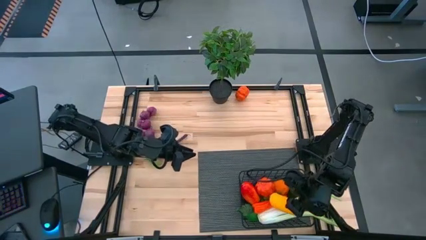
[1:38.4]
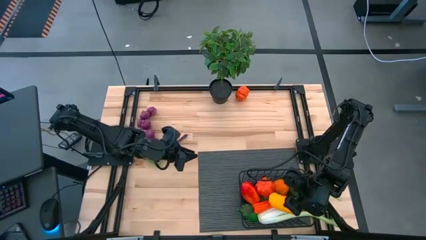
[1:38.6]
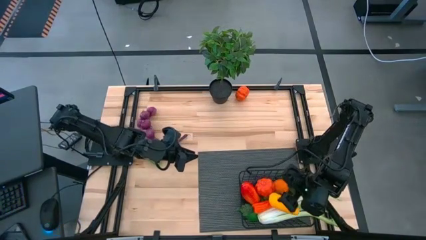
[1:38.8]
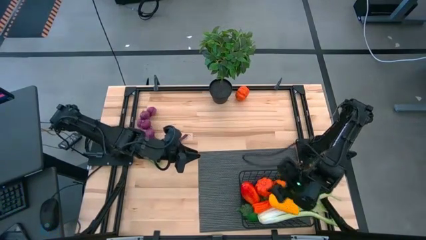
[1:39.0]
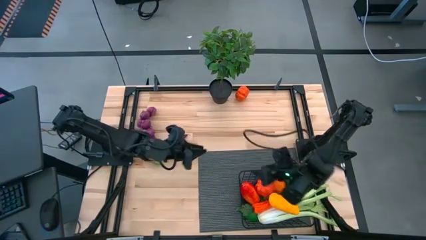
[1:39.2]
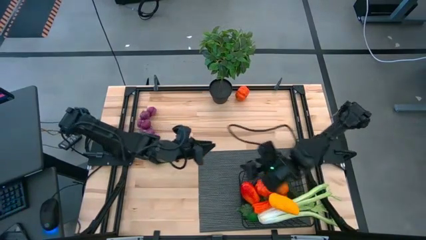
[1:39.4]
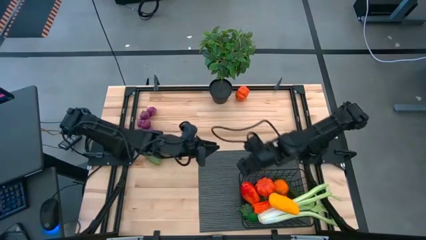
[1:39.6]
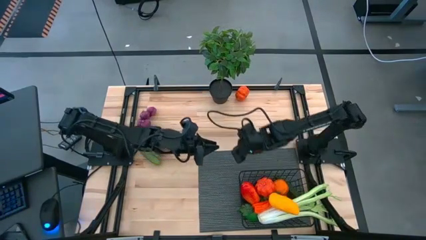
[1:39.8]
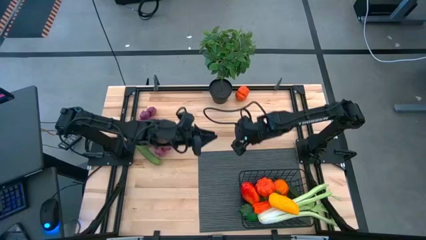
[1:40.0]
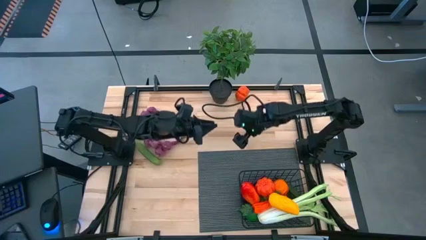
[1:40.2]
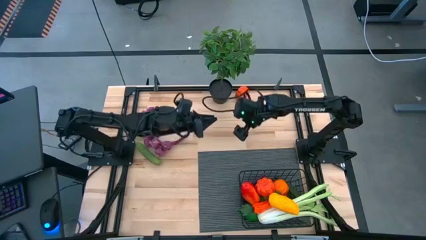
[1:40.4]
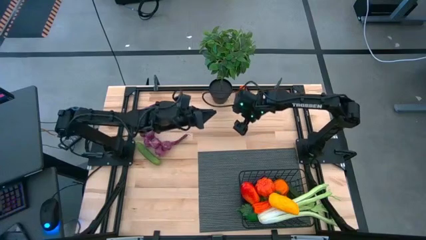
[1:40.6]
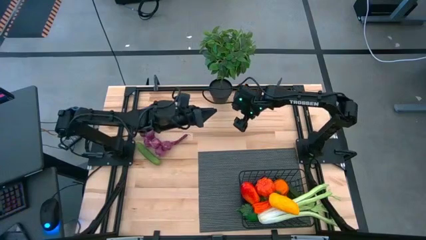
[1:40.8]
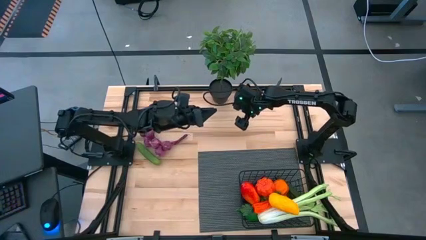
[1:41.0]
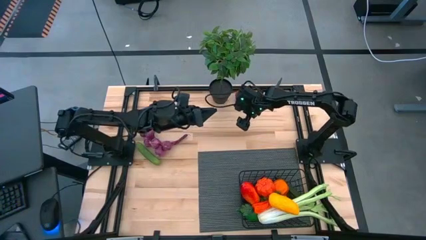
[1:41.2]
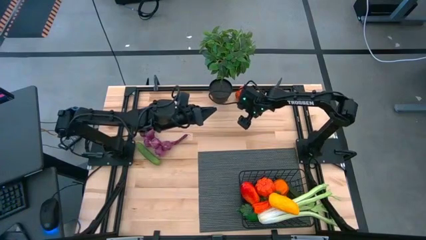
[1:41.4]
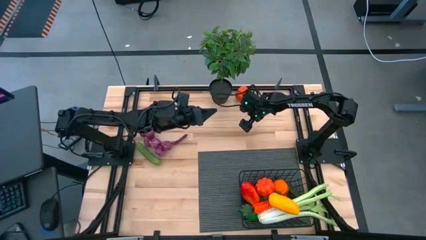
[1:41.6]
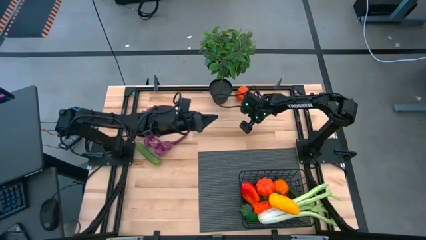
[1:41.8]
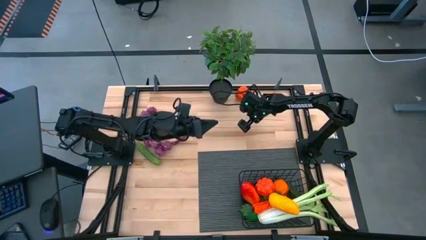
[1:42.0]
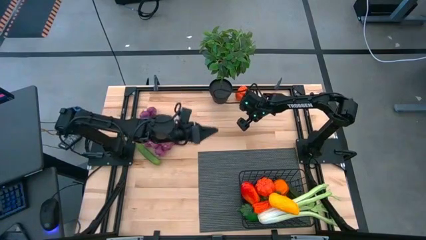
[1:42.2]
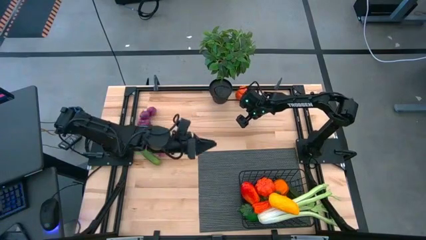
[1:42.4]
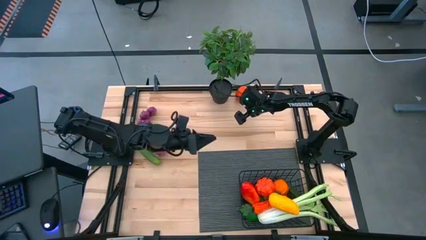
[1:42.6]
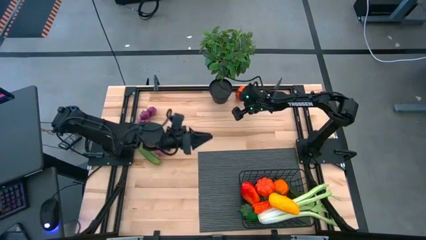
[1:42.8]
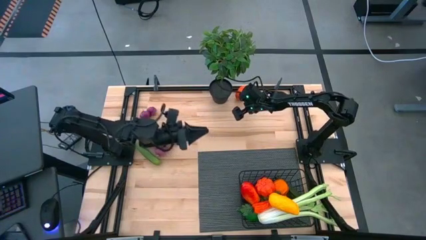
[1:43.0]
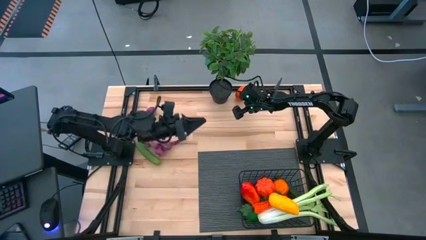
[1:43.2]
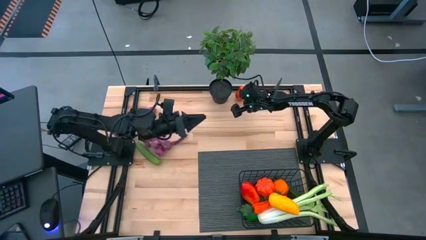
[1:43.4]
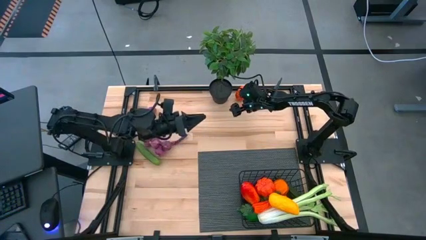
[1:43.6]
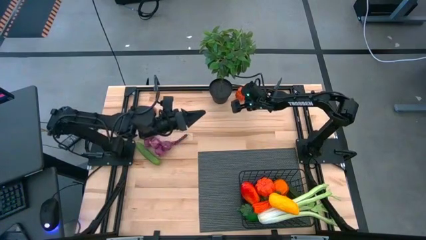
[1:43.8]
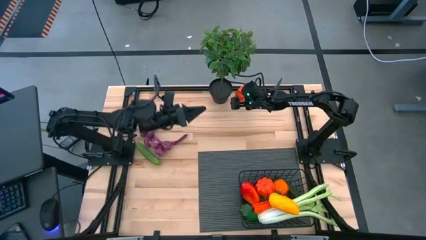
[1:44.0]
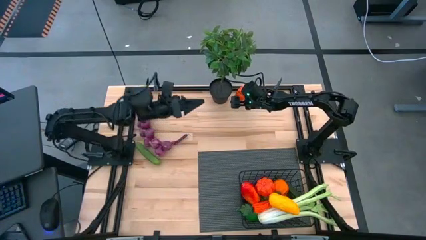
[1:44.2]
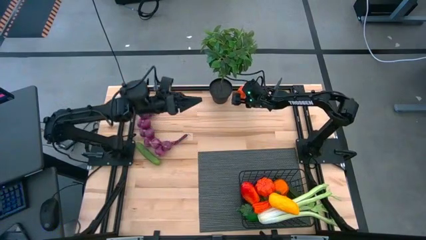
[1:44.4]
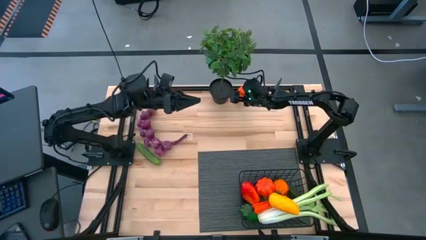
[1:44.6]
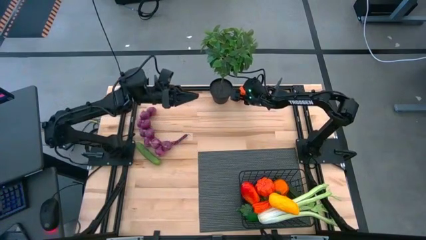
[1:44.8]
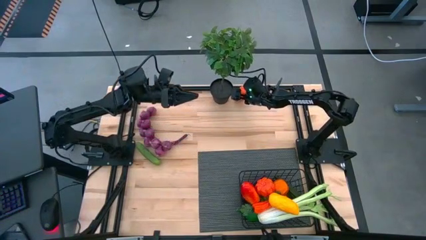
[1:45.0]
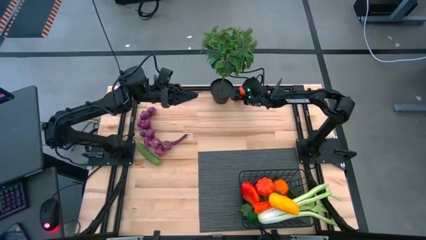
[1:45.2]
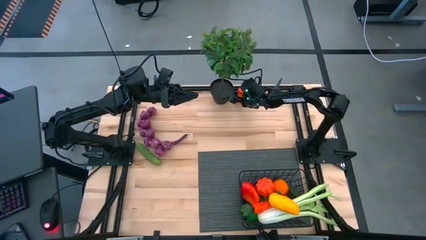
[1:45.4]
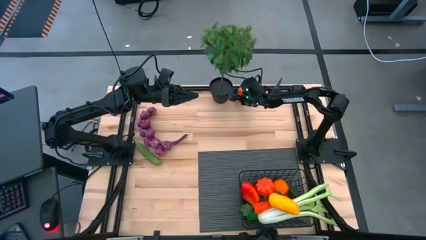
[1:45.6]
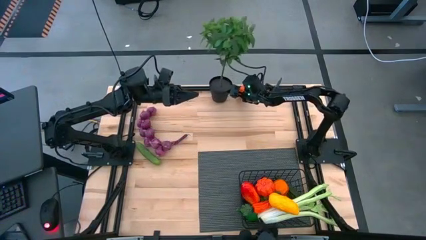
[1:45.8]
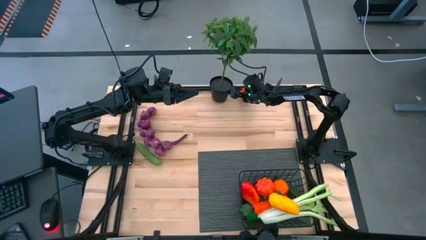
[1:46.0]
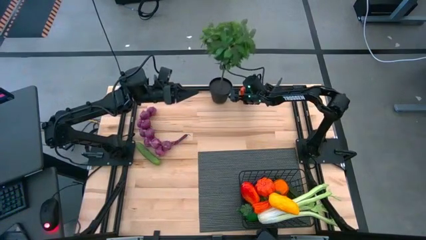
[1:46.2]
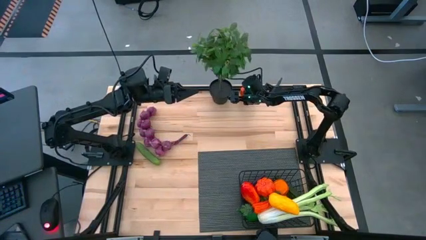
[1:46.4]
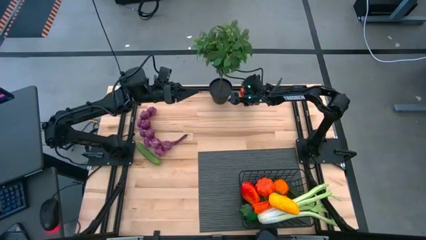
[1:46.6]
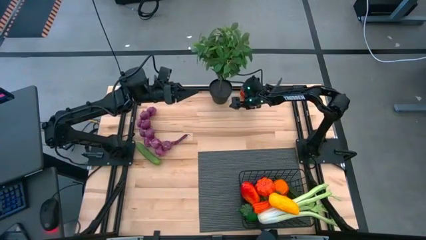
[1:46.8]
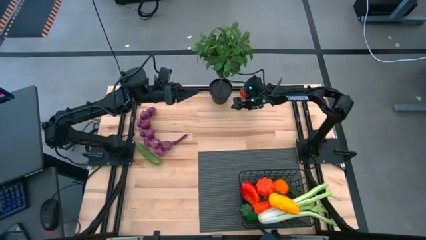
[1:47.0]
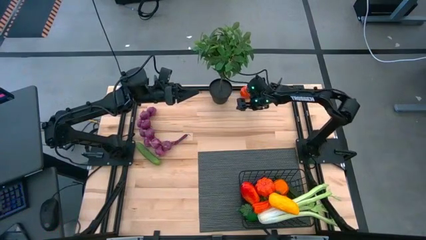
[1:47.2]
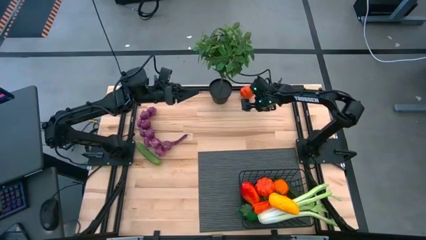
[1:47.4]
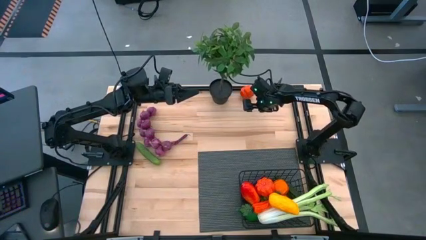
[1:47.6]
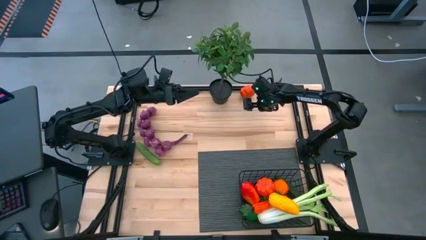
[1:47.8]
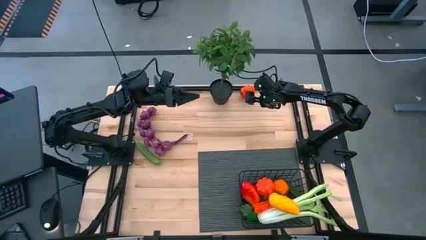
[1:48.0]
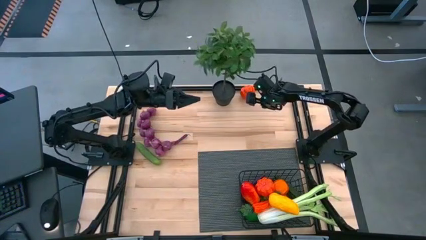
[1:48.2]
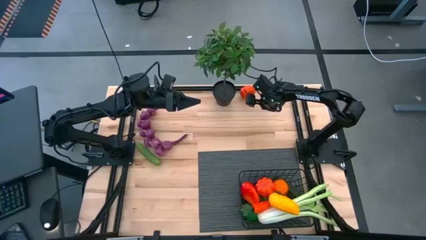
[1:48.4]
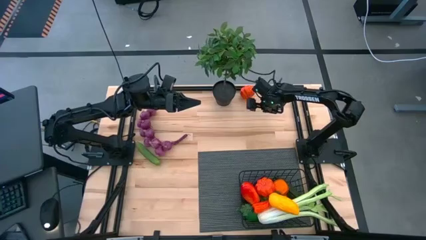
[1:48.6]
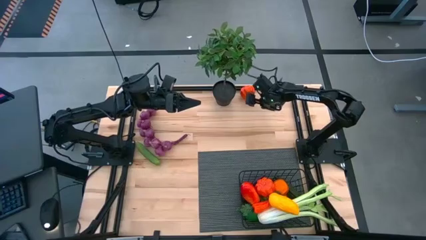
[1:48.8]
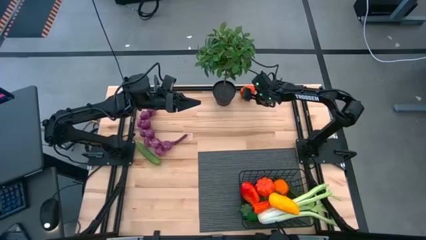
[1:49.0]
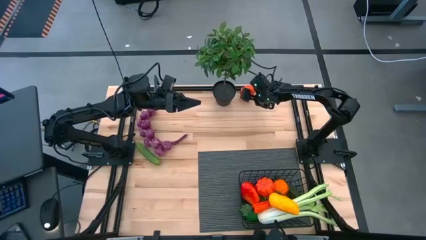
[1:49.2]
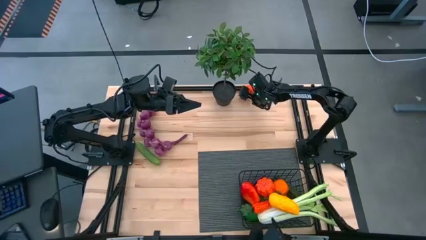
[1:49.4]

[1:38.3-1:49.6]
Task: Build produce basket
Put the orange pumpkin into the black wire basket
